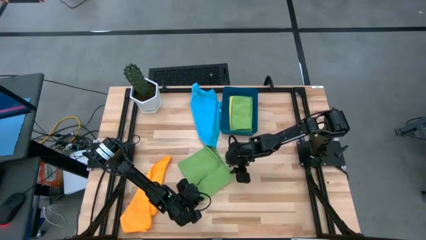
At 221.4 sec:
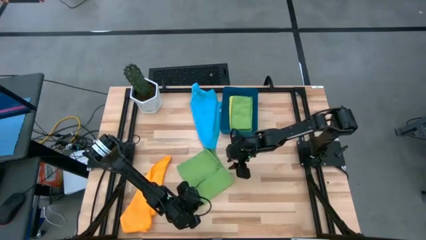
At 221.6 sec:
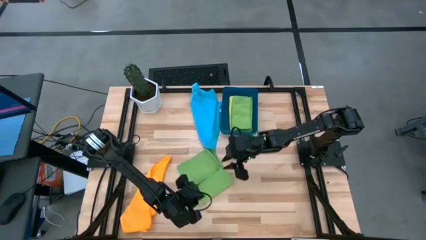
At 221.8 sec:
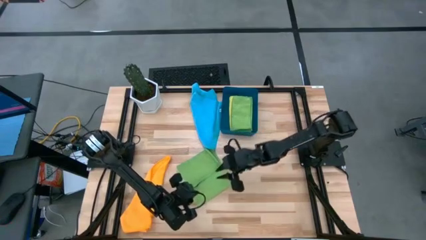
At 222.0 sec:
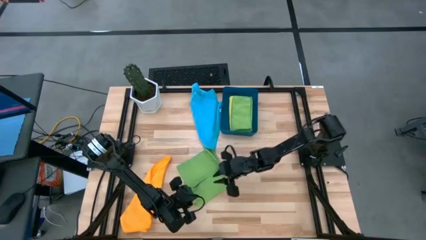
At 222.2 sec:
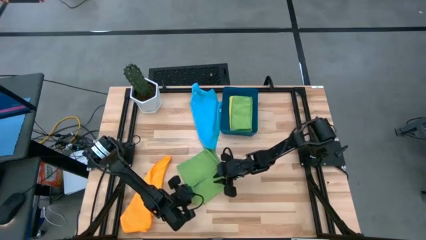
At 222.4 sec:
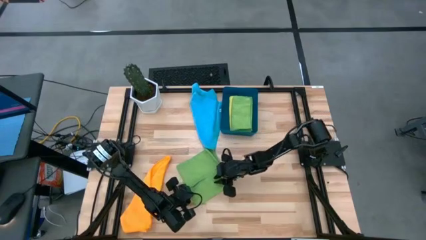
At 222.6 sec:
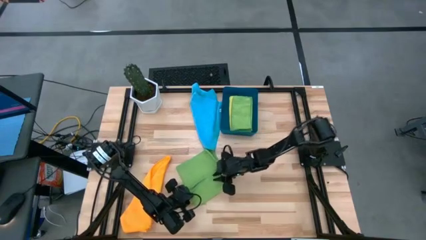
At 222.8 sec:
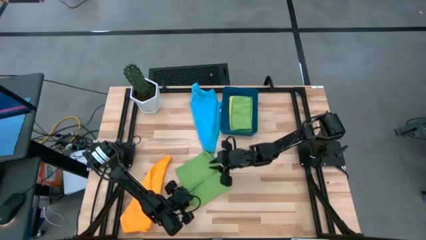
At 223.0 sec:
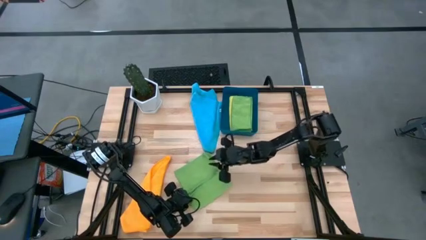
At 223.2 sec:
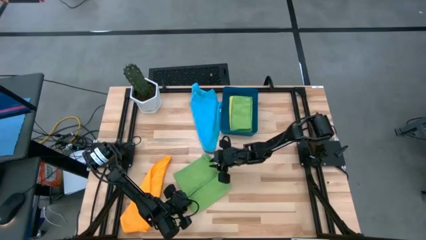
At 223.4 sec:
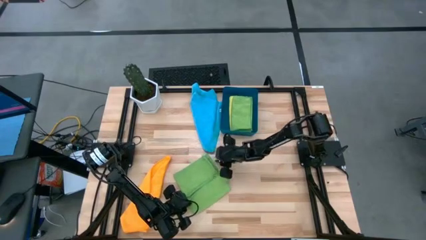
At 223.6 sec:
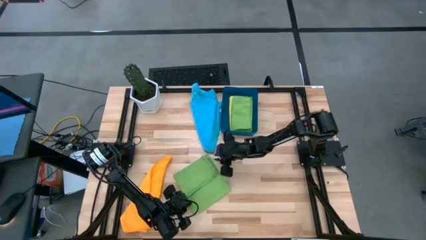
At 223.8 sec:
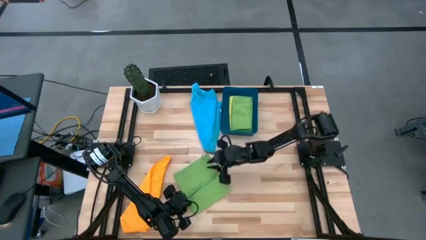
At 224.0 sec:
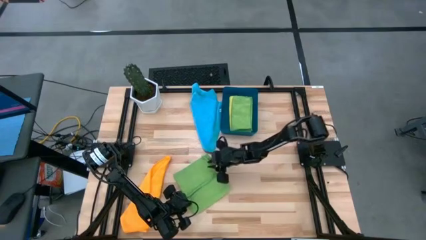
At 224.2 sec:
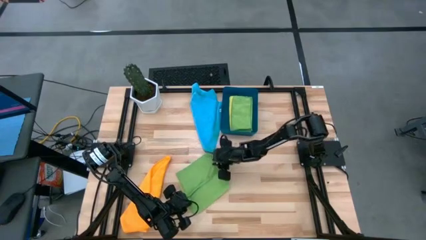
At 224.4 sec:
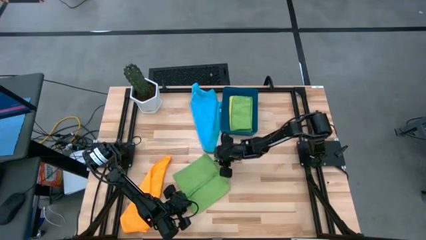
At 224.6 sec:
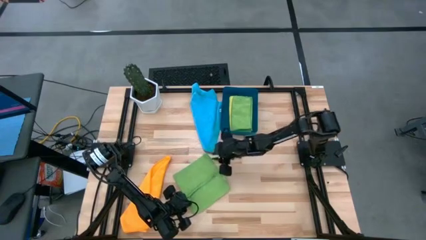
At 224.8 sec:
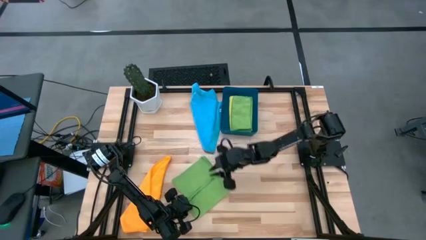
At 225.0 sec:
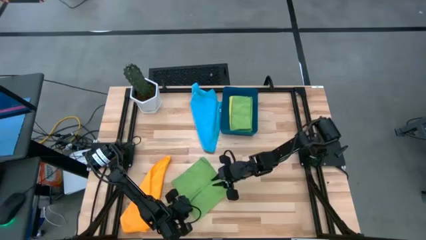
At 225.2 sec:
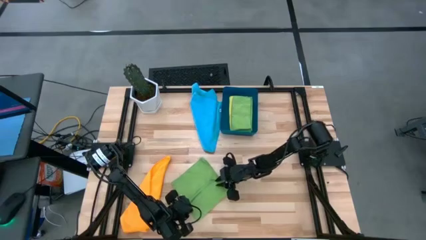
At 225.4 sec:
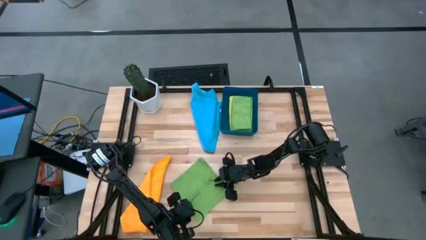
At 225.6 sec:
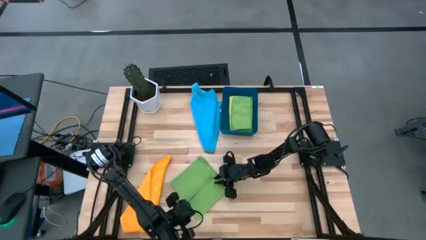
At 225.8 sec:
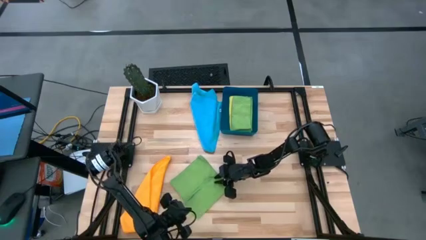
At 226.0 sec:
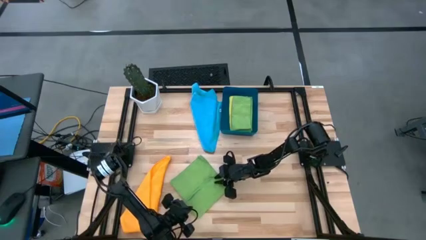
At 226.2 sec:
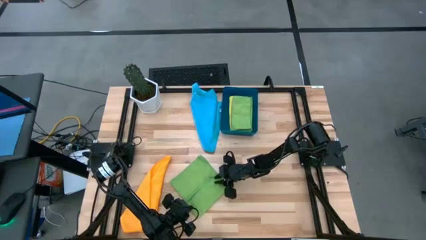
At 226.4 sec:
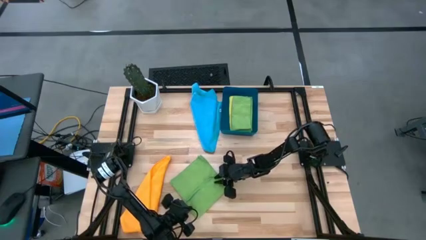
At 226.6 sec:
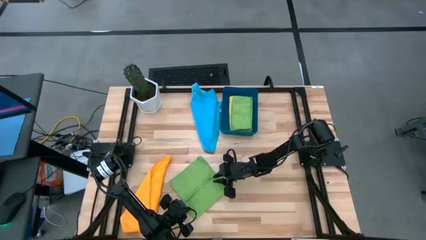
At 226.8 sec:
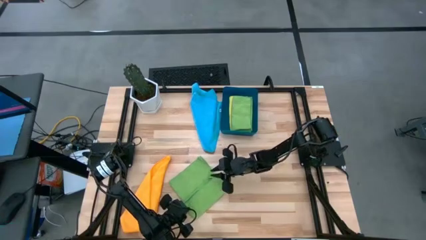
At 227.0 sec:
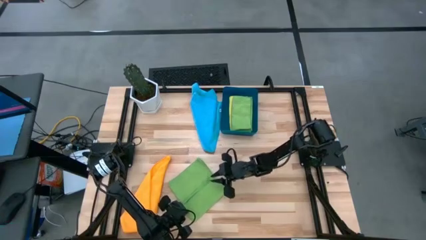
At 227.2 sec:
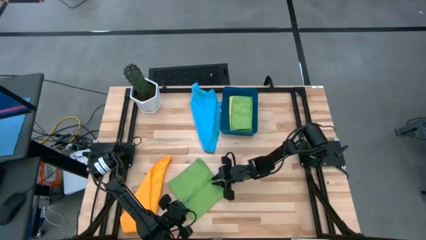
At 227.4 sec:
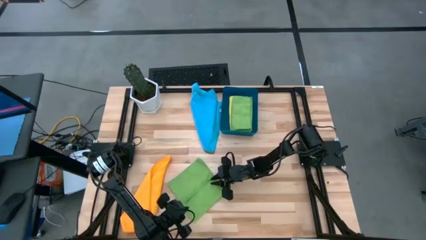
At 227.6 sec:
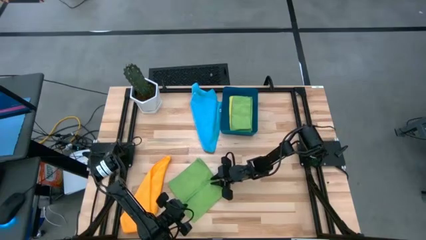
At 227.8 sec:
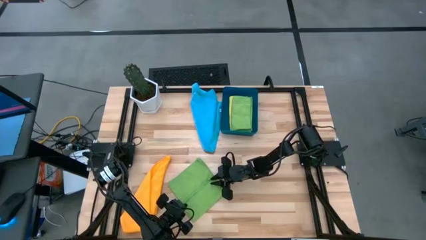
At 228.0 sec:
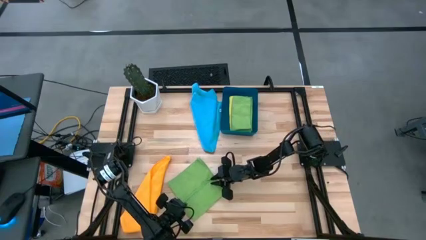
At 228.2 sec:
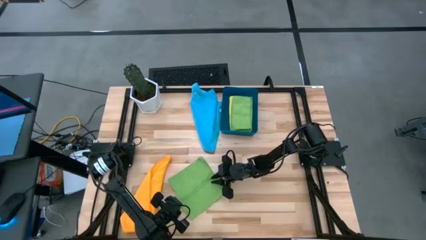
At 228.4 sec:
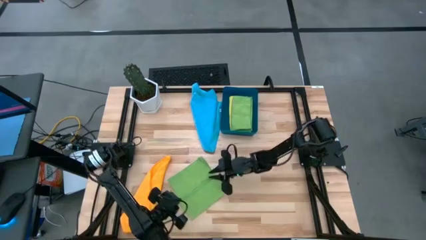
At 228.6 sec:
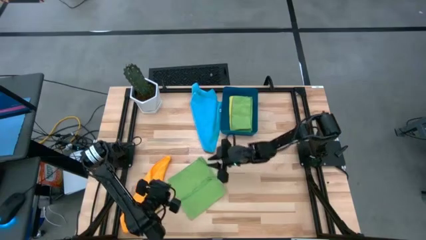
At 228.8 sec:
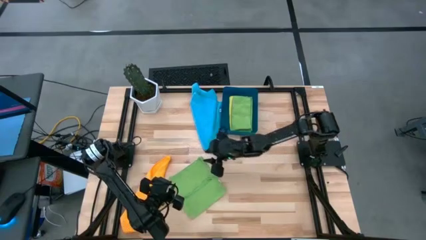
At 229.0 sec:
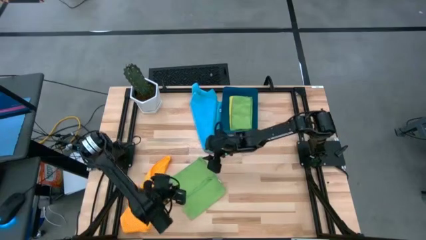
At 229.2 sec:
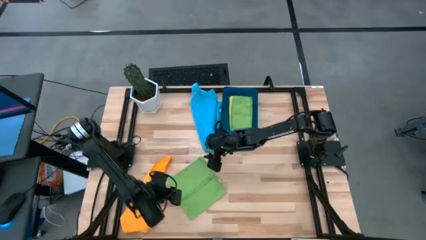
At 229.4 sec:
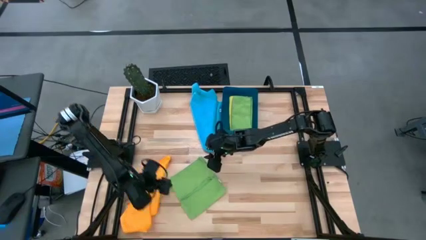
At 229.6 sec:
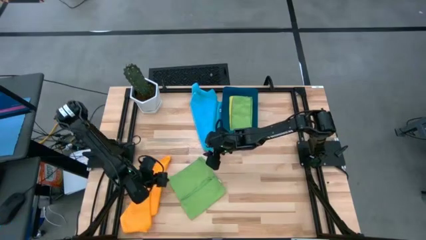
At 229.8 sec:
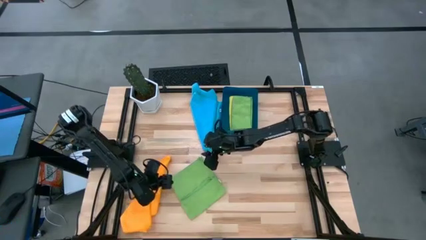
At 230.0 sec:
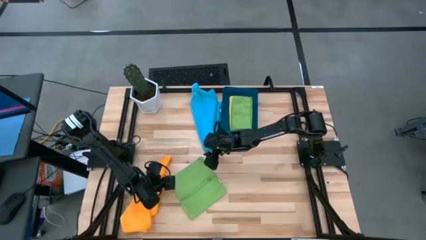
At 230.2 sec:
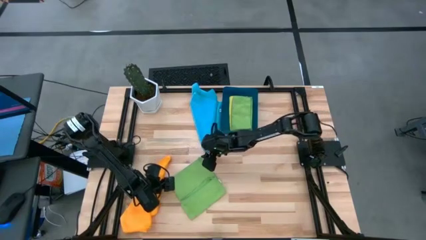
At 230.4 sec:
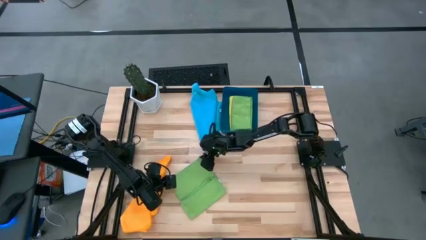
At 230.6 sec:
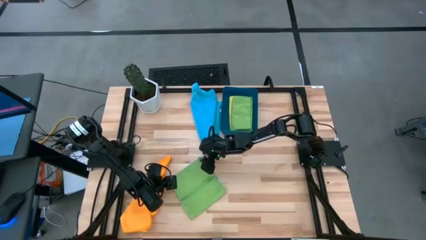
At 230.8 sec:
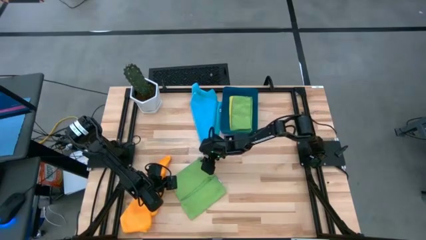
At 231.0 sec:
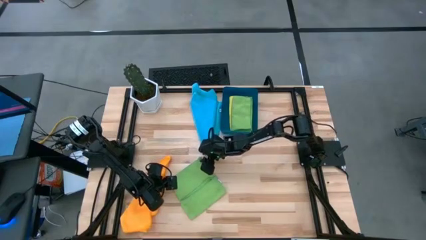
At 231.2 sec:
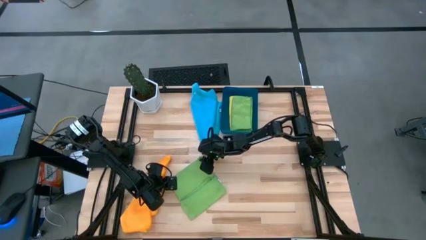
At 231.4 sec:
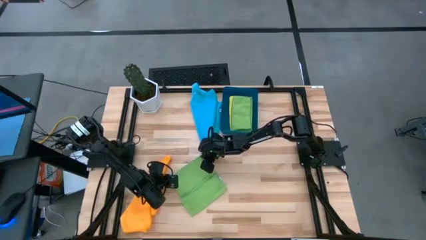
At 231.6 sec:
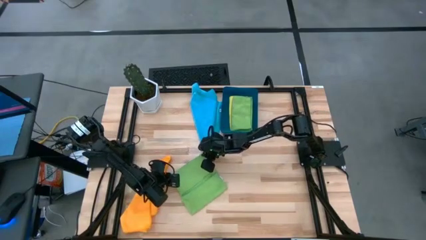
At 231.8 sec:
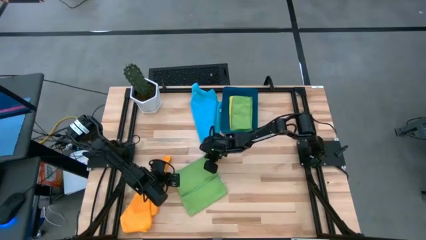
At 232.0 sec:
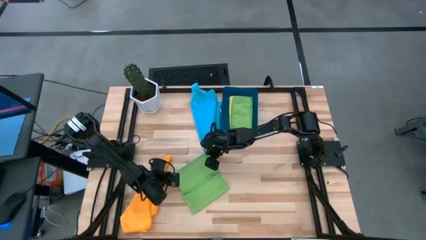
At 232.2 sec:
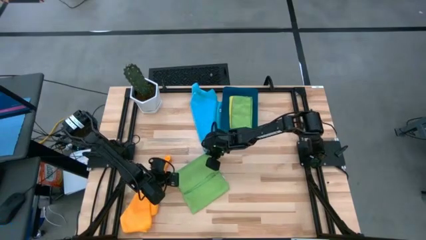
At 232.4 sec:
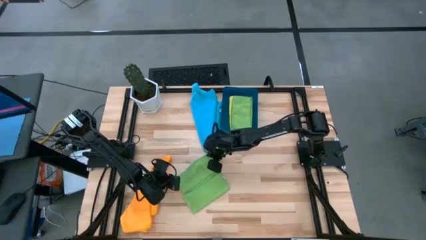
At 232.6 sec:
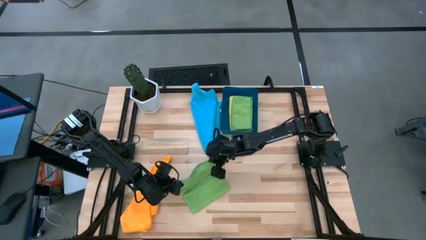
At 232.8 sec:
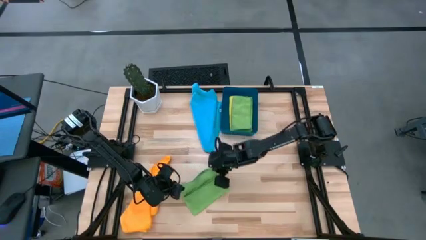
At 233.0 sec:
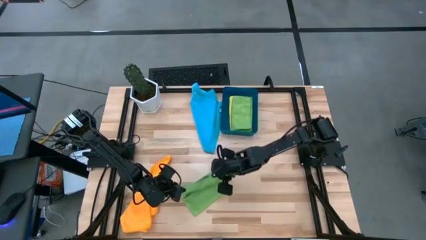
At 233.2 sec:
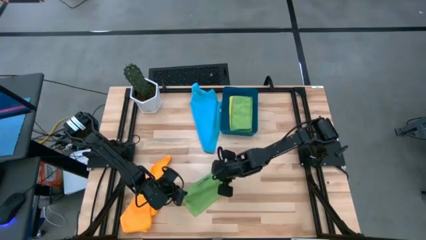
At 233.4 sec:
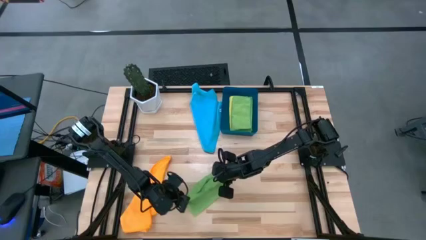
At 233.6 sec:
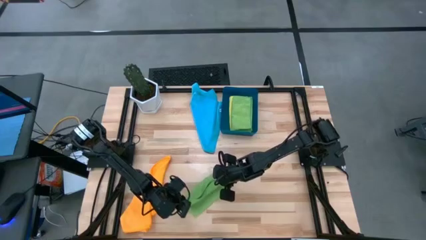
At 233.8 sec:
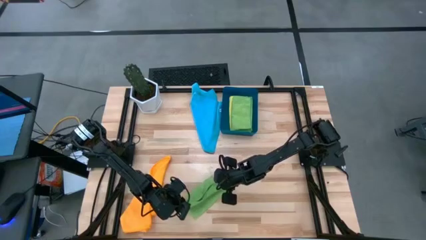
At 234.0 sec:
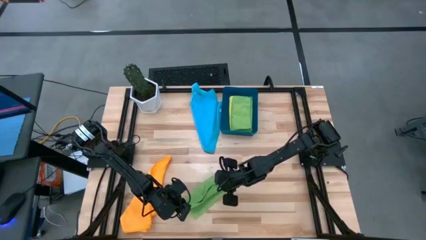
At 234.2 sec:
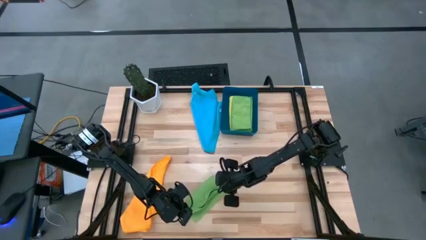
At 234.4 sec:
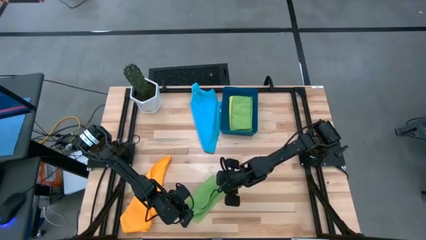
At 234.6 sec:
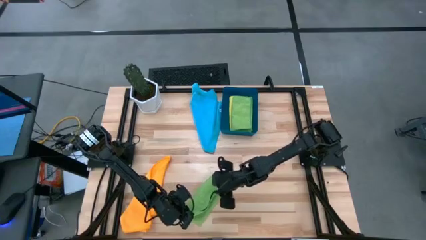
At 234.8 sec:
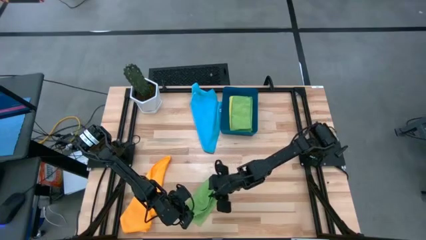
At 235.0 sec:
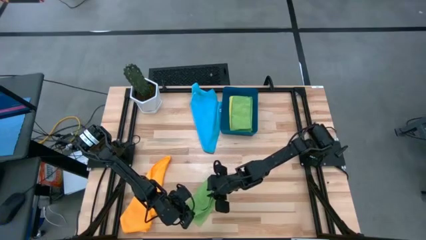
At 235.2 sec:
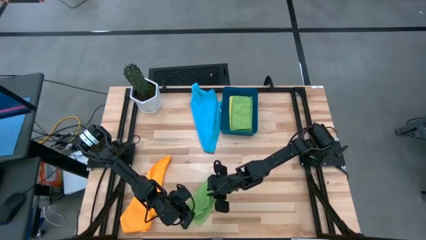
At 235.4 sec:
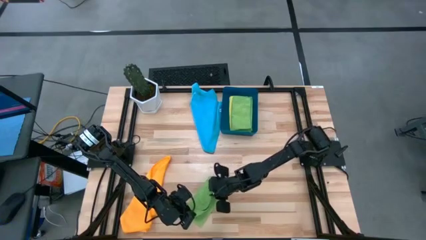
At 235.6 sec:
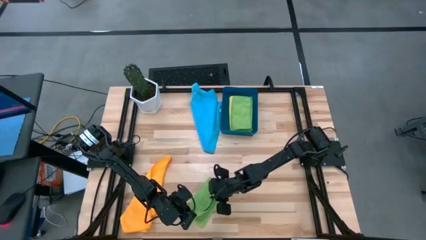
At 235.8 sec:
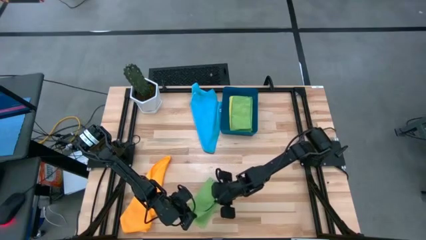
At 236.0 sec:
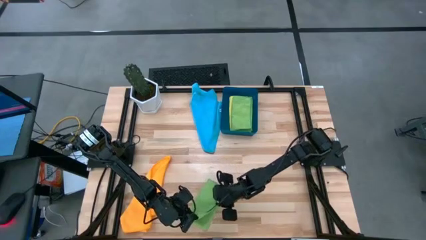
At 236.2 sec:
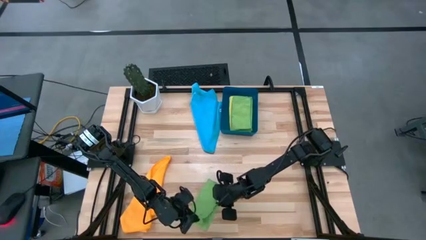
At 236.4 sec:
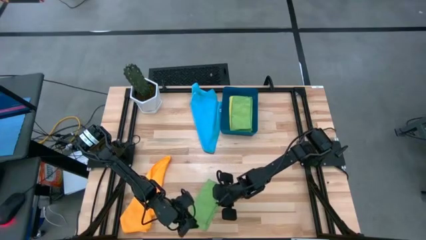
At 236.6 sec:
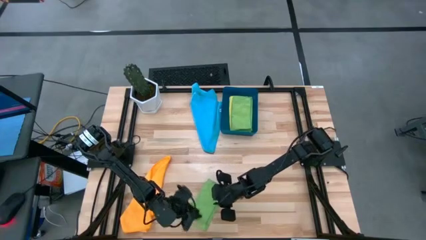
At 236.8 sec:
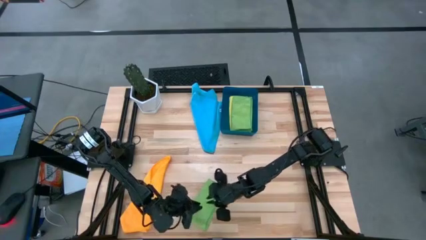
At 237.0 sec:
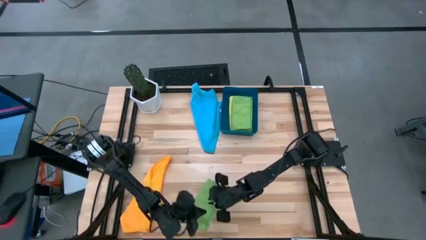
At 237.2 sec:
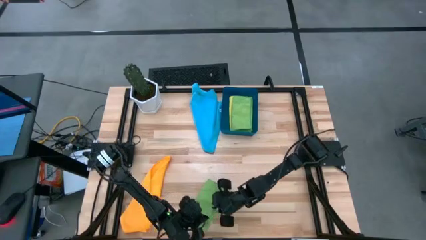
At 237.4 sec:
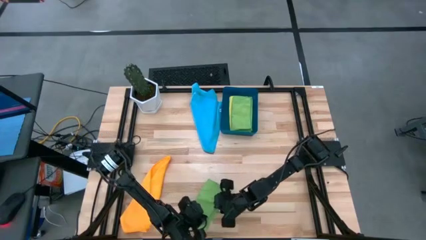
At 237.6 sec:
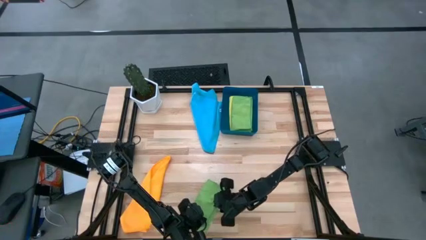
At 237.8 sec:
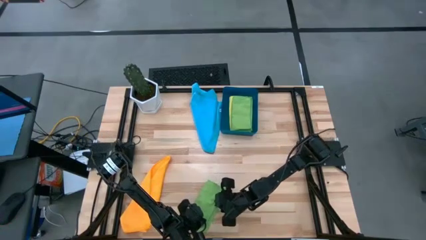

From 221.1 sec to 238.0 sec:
Task: Fold microfiber towels
Fold the green towel
